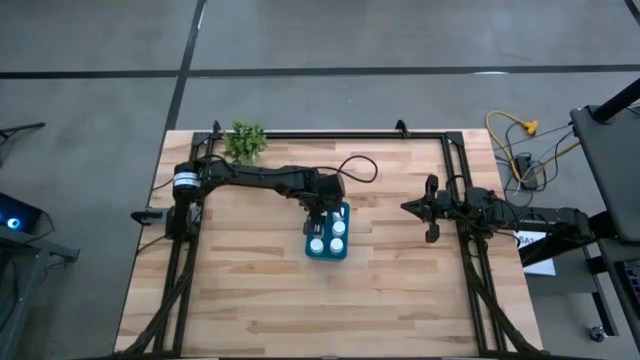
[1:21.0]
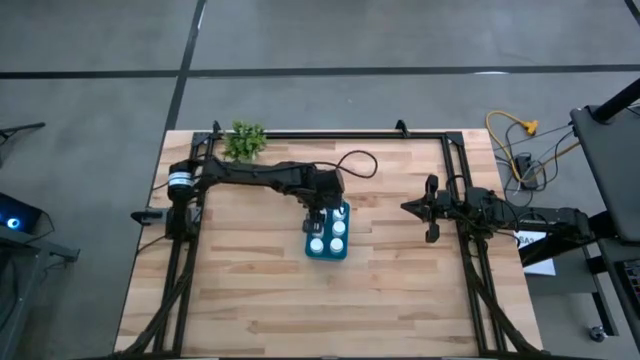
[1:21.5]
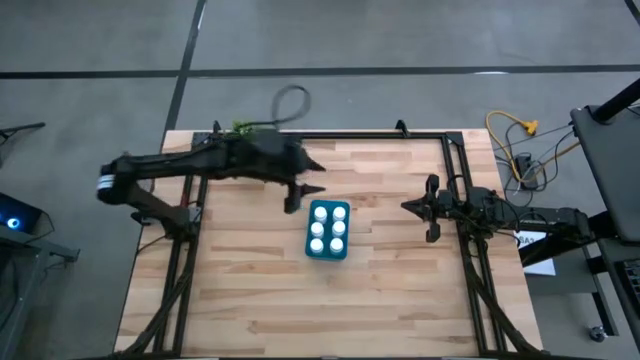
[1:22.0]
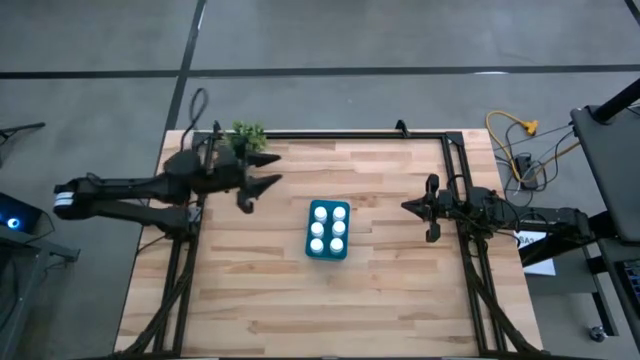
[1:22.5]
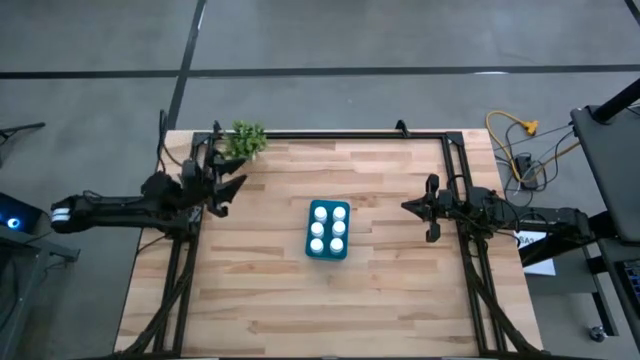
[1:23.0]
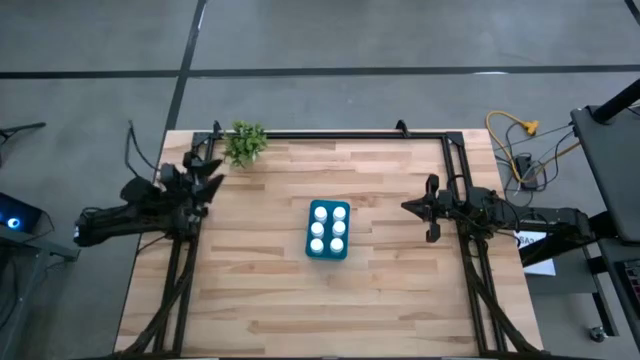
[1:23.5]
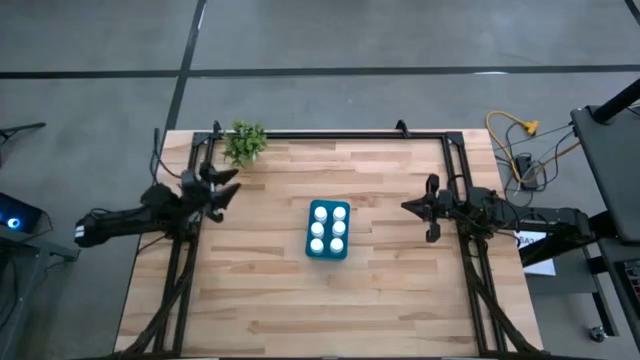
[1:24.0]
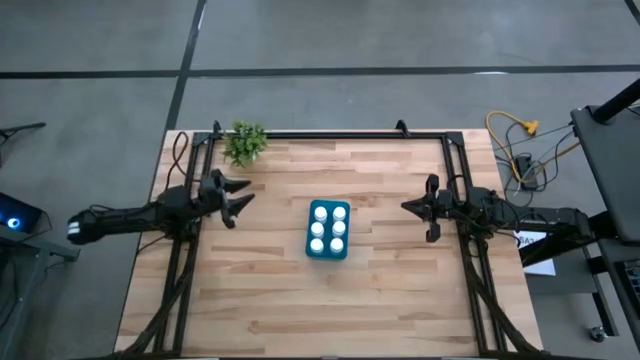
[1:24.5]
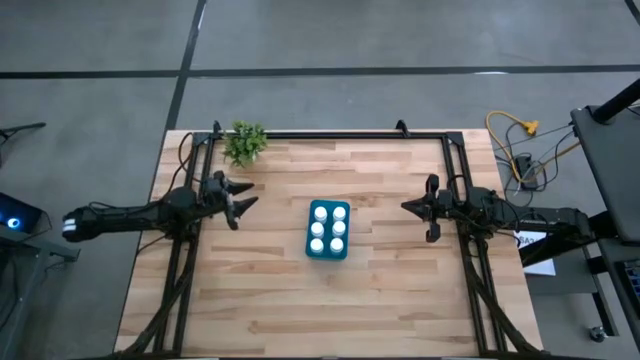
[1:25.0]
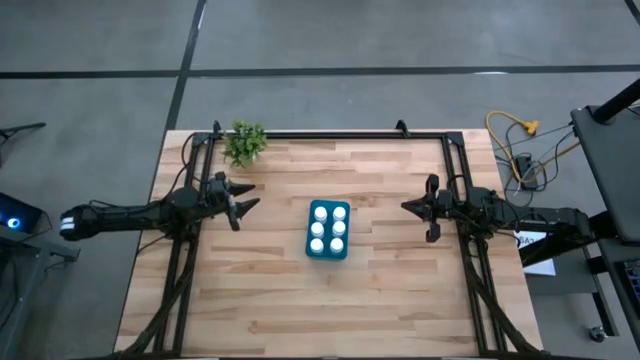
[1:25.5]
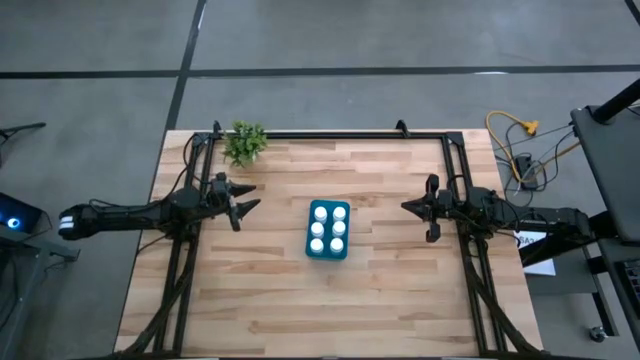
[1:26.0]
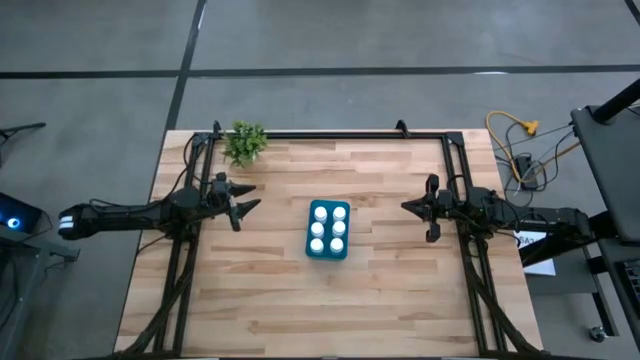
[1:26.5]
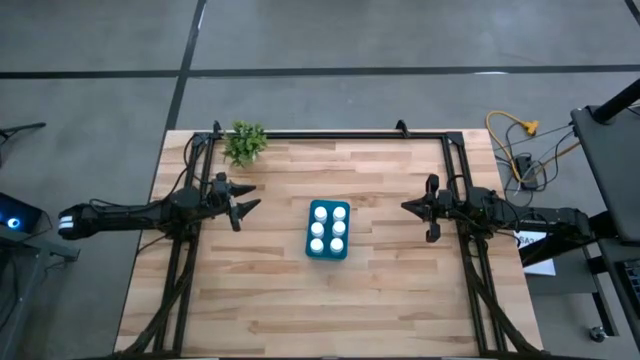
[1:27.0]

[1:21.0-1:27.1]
Task: Pick and place pill bottles into a basket
Return to Home Position

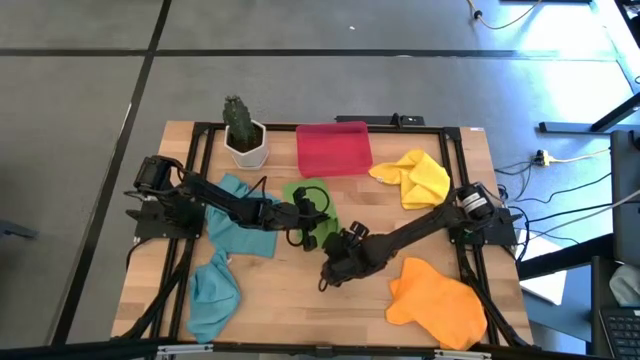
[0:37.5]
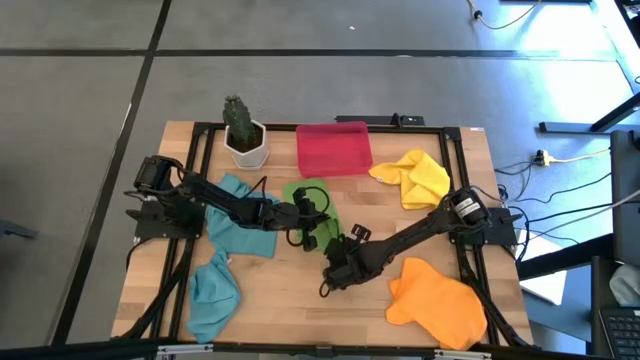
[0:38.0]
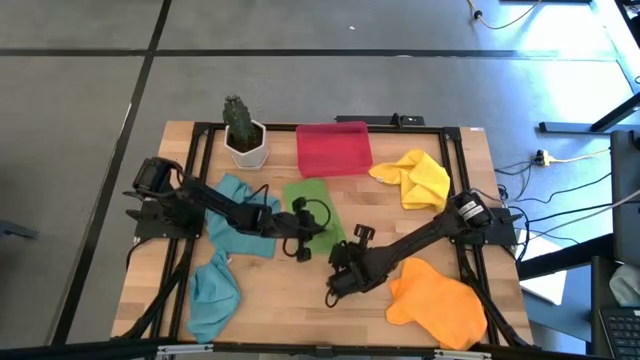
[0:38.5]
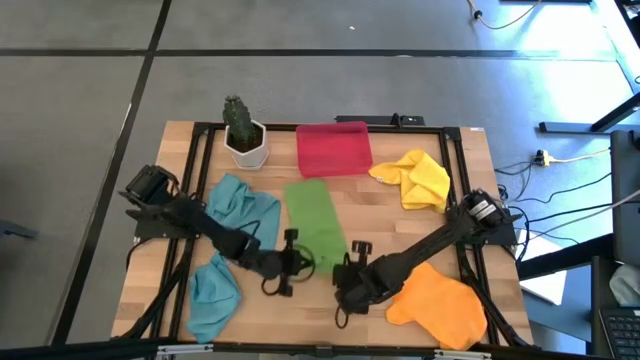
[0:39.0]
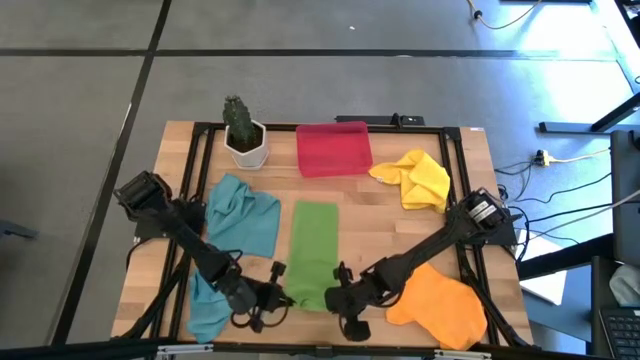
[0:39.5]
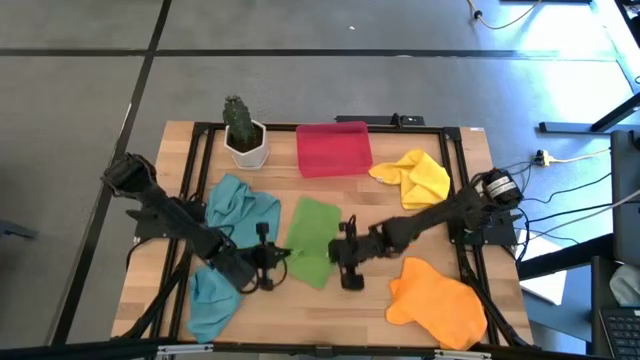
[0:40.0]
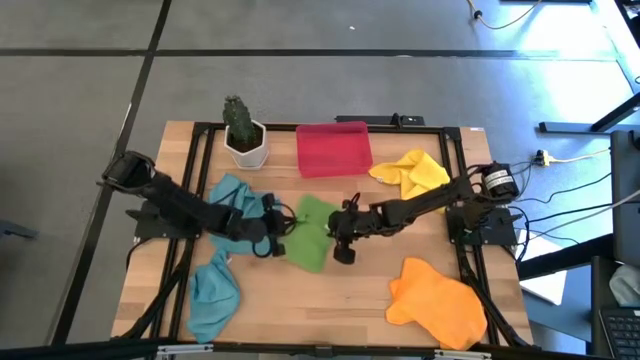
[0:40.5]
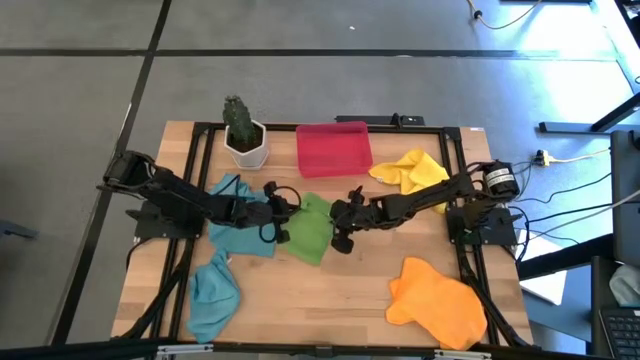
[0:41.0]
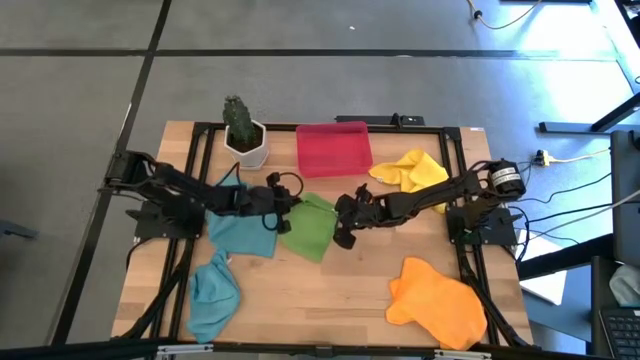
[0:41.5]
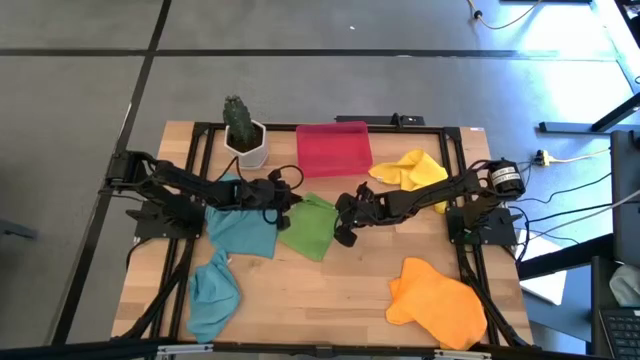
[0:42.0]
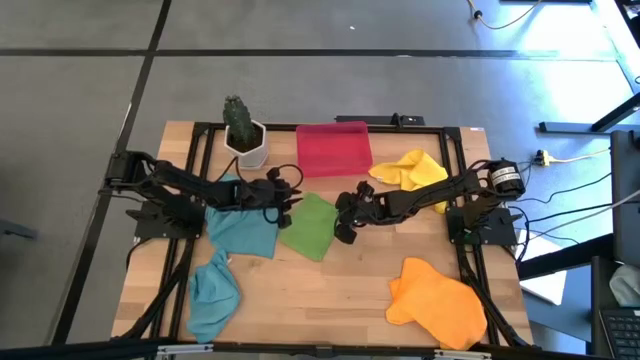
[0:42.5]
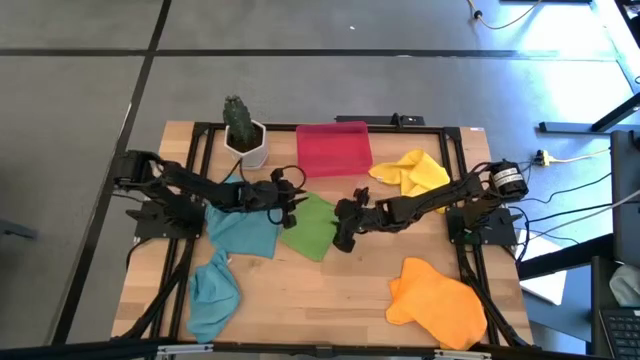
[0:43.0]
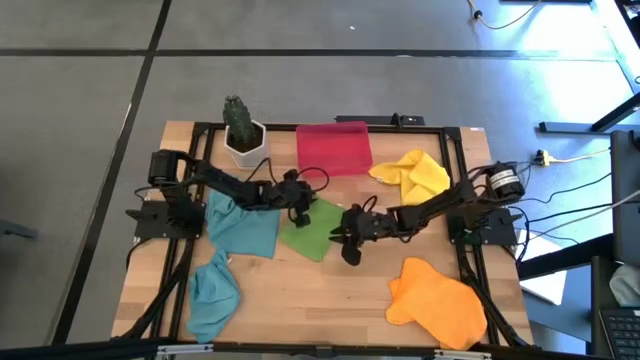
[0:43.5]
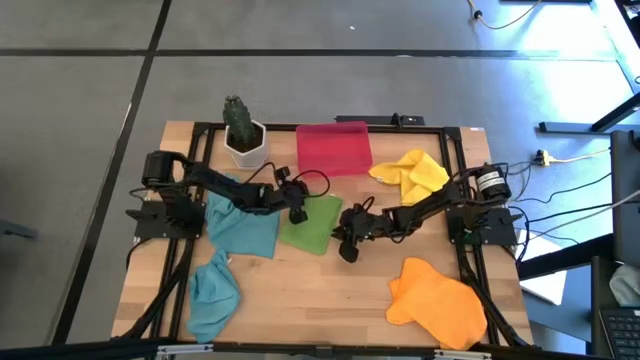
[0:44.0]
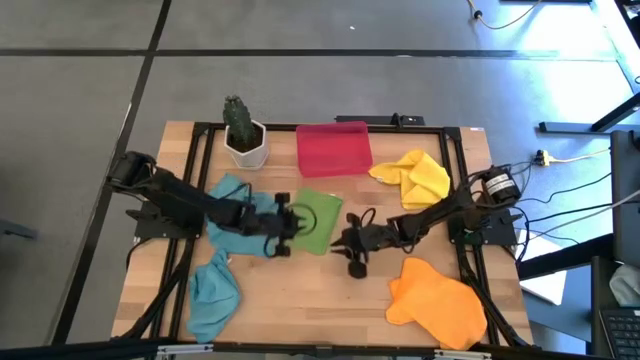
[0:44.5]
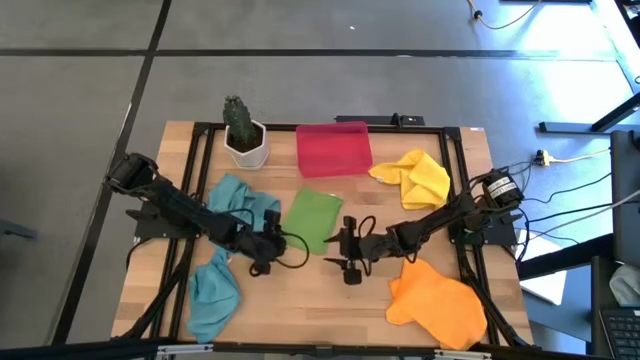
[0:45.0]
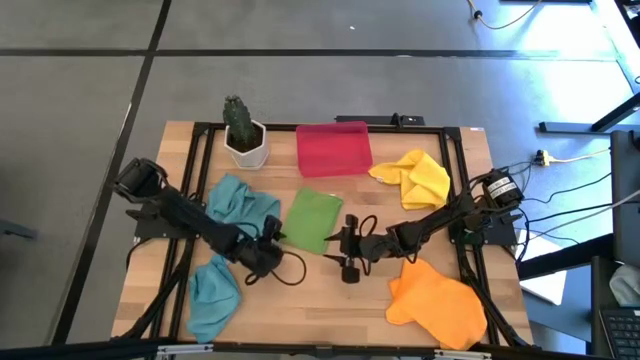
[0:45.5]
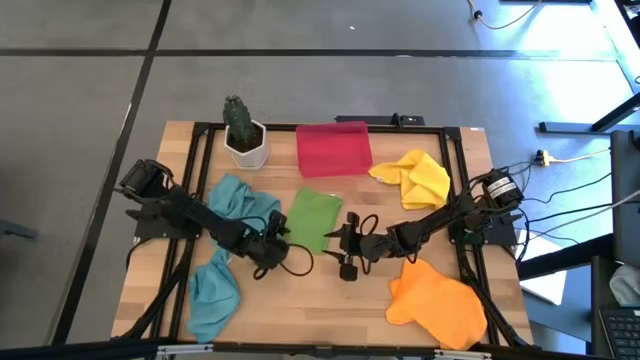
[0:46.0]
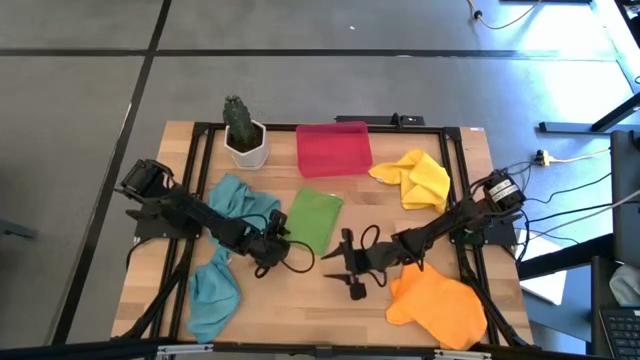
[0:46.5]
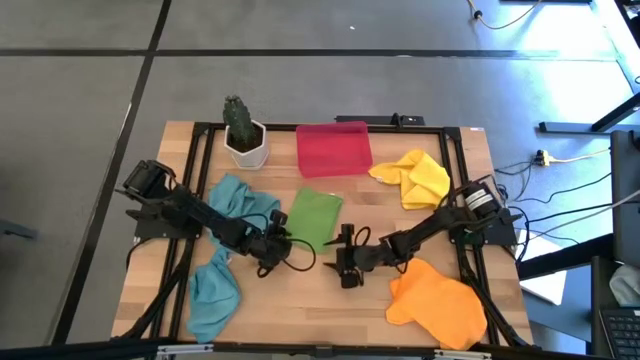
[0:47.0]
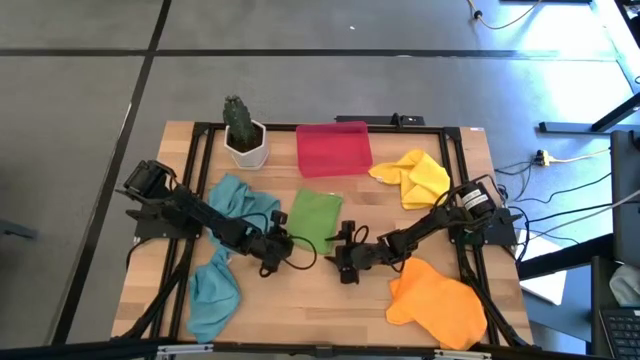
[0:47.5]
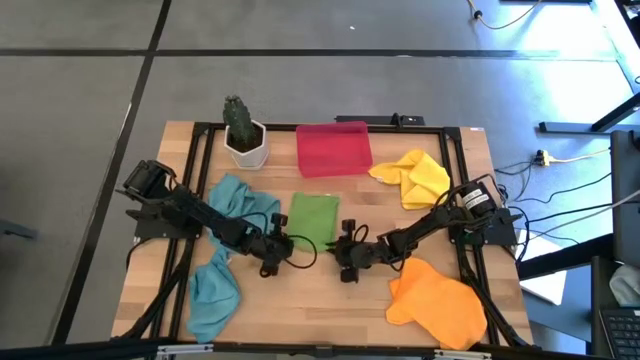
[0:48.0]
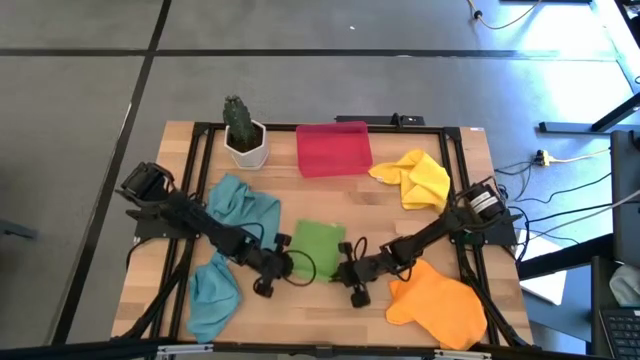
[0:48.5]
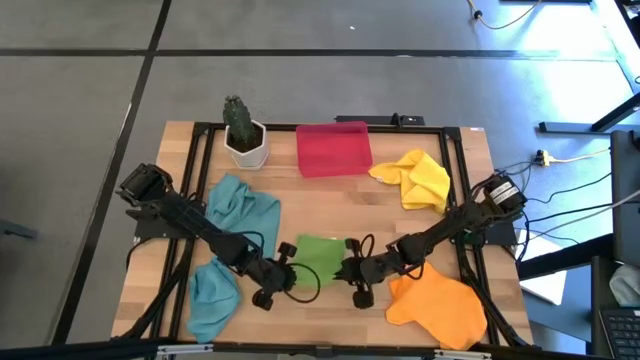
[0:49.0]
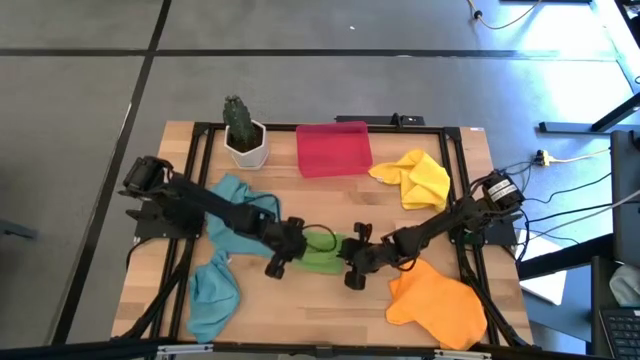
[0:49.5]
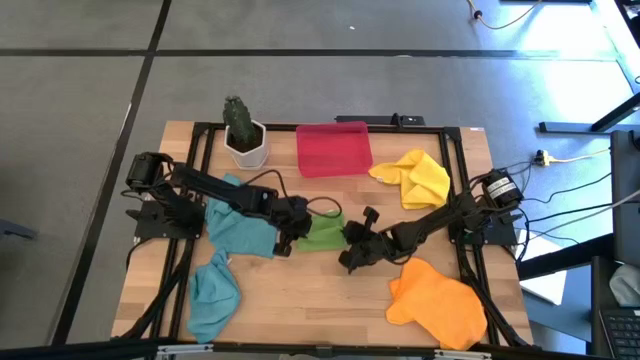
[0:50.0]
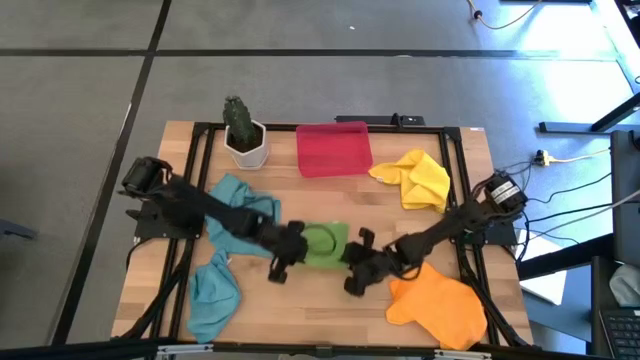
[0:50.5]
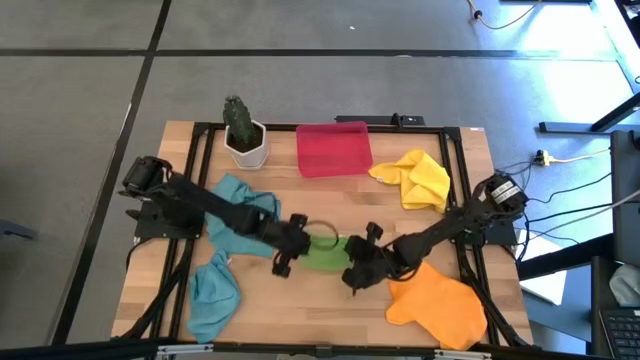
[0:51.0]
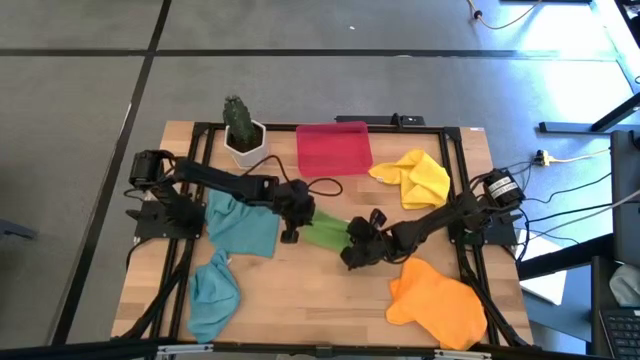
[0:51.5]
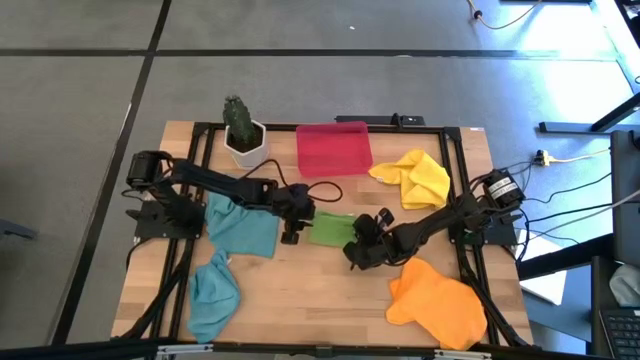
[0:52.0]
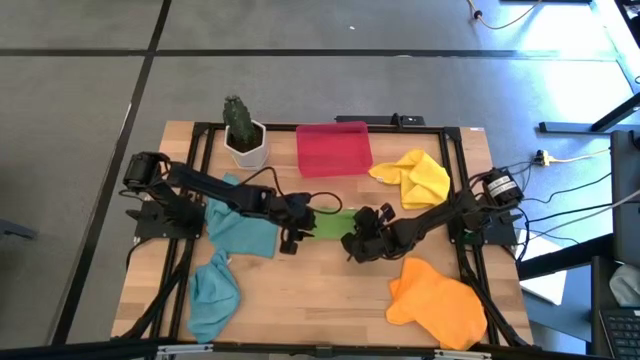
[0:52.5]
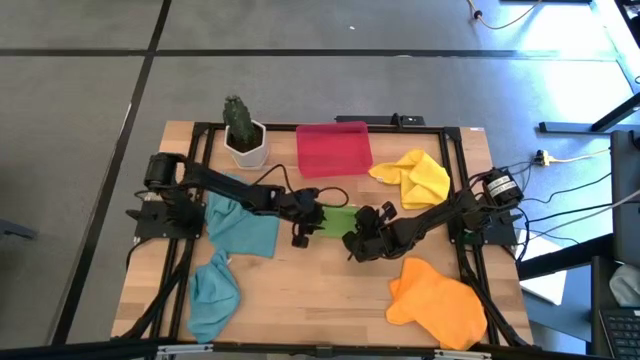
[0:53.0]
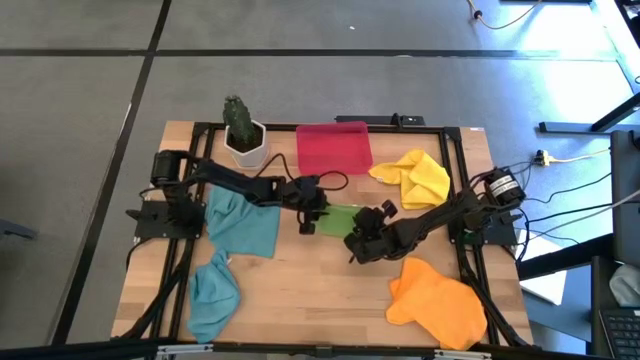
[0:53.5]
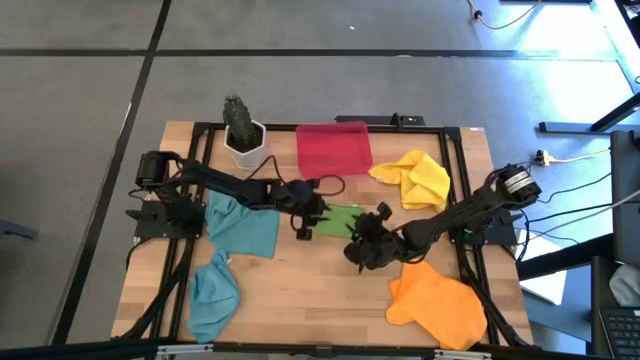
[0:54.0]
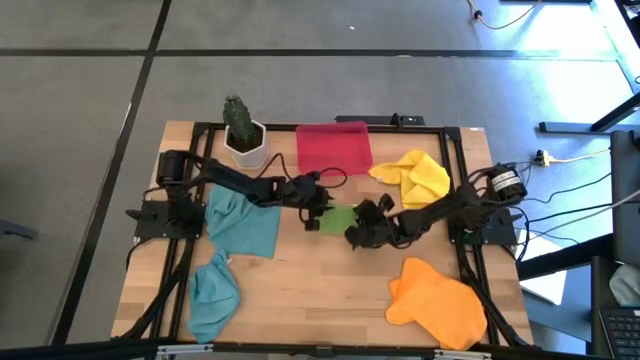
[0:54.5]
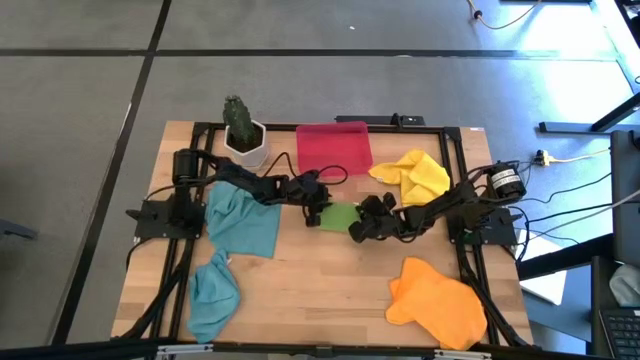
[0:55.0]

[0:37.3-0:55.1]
Task: Fold microfiber towels
Fold the green microfiber cloth
